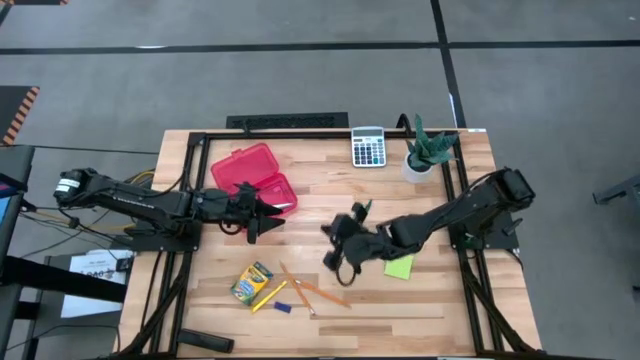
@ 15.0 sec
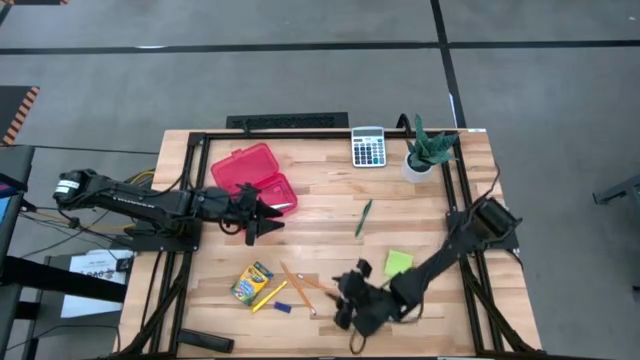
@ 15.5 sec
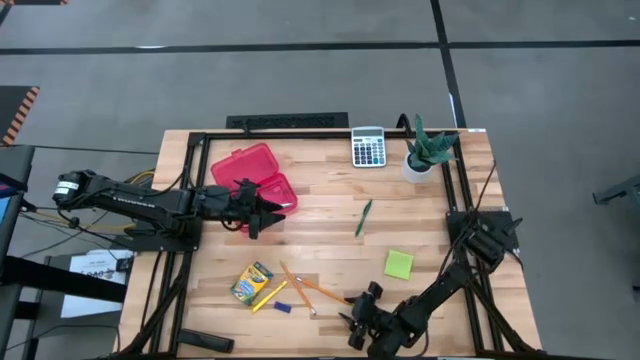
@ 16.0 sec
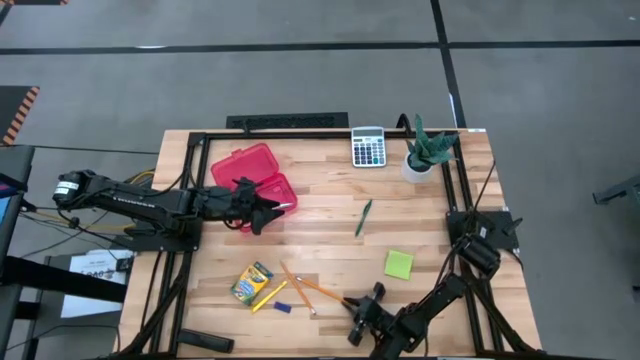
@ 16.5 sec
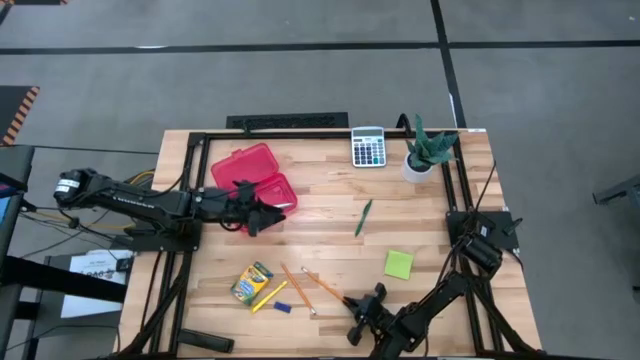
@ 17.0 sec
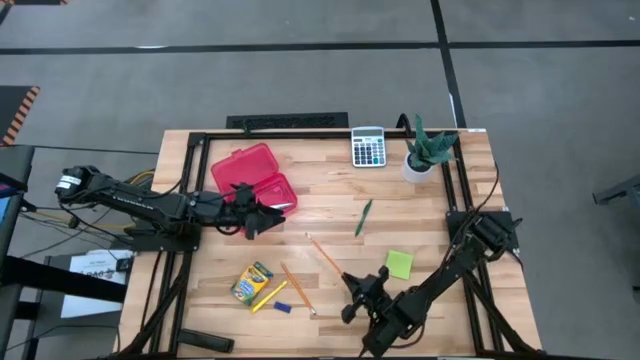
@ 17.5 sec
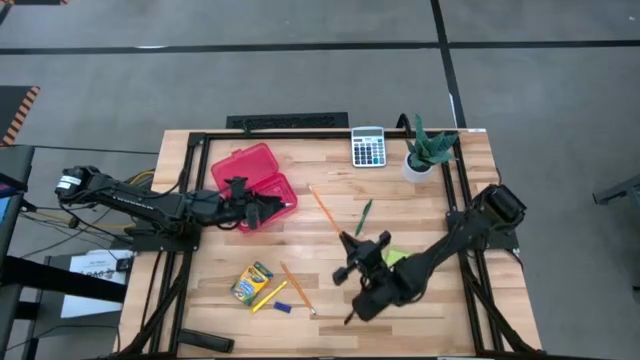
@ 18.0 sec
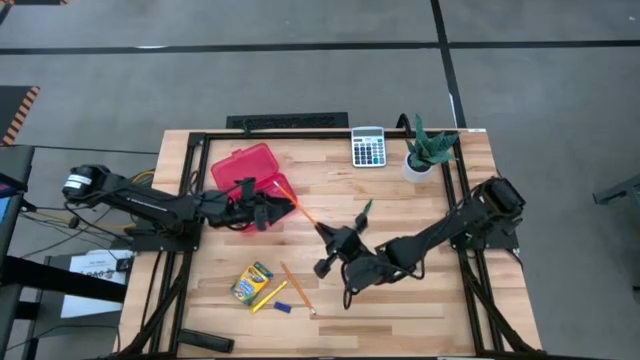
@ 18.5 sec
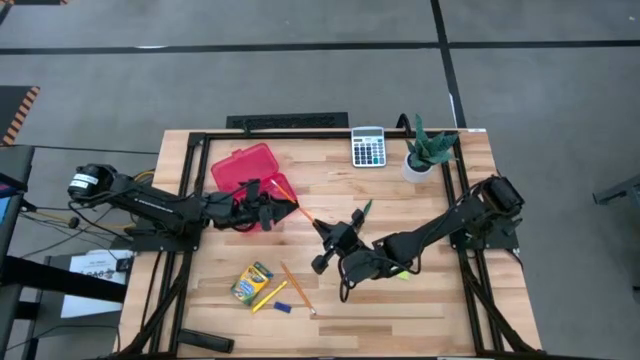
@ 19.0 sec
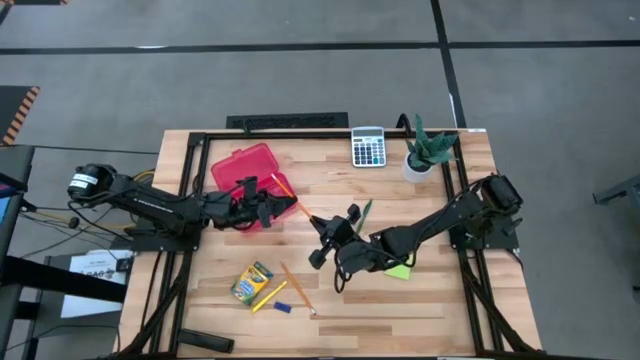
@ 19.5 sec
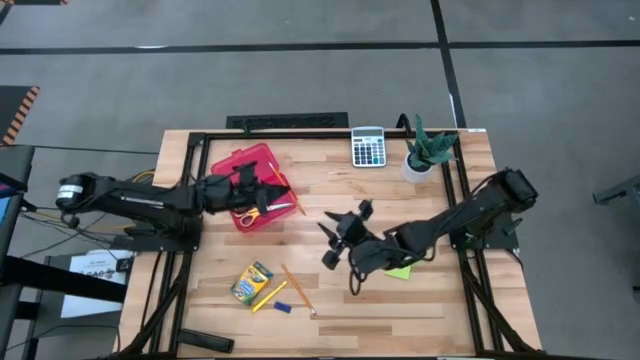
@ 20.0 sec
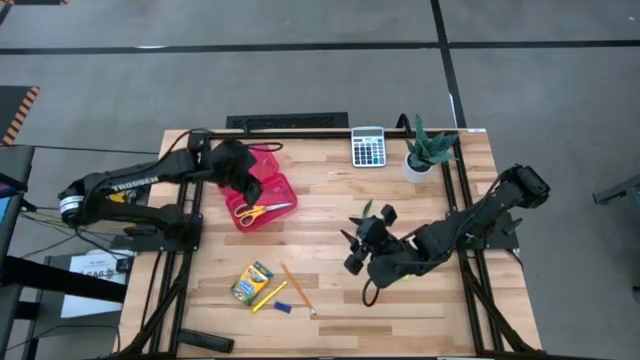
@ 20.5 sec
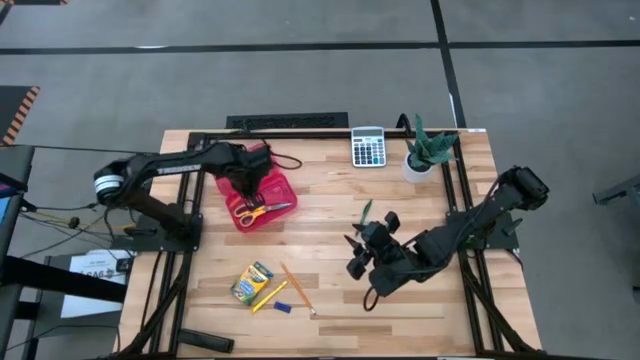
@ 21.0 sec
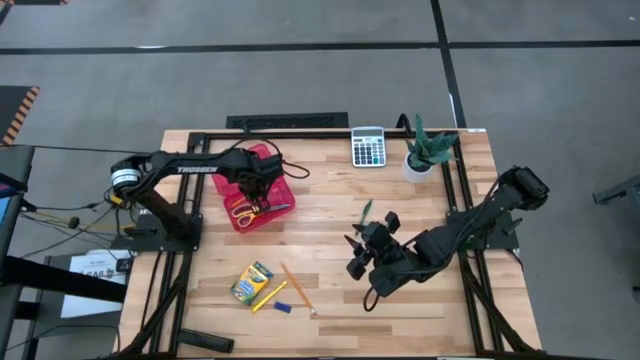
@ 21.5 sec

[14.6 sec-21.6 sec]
Task: Pack school essentials
Put the right orange pencil into the red supply box

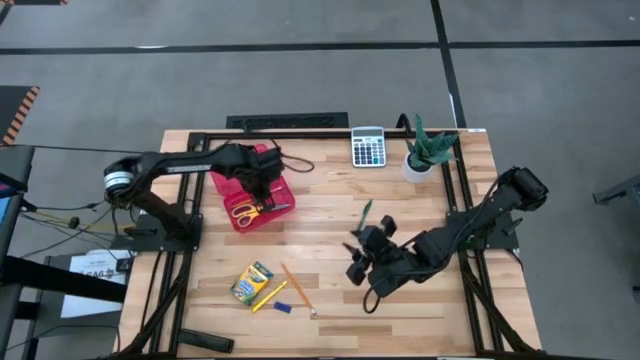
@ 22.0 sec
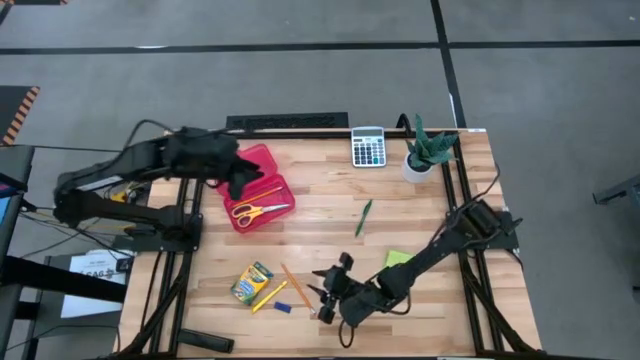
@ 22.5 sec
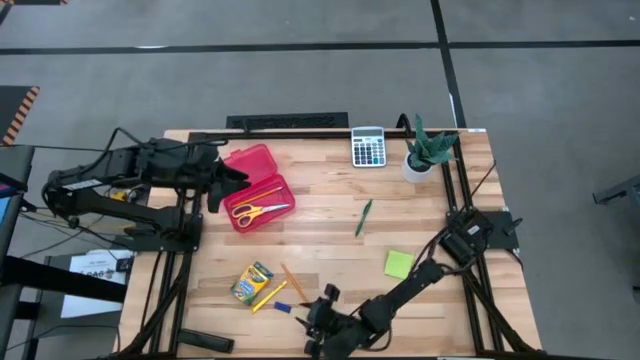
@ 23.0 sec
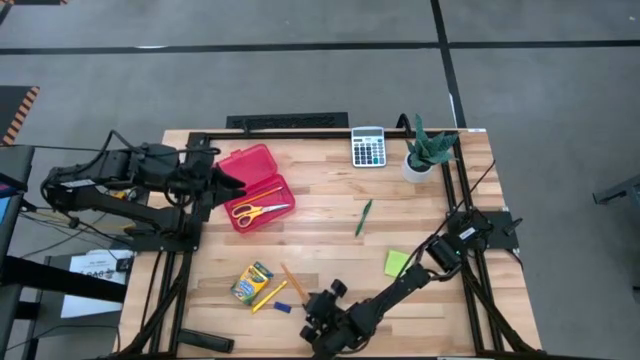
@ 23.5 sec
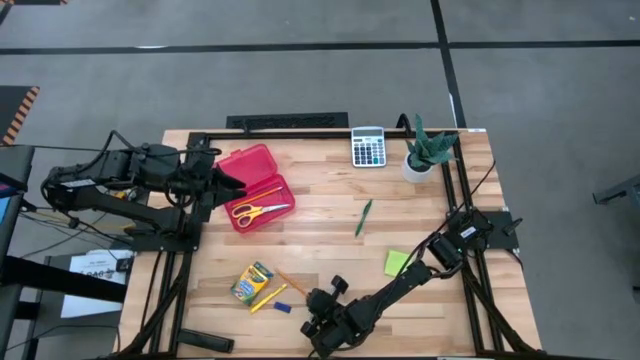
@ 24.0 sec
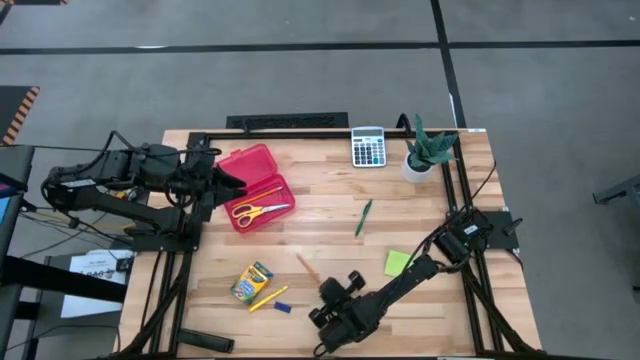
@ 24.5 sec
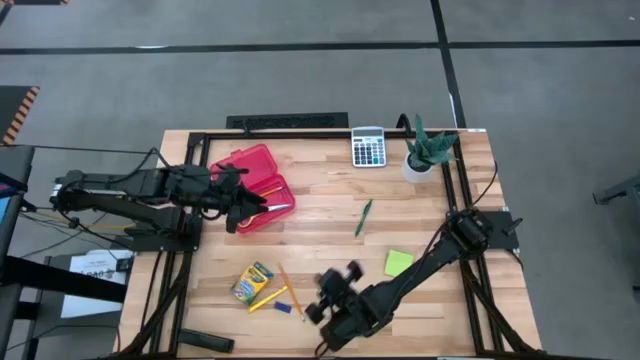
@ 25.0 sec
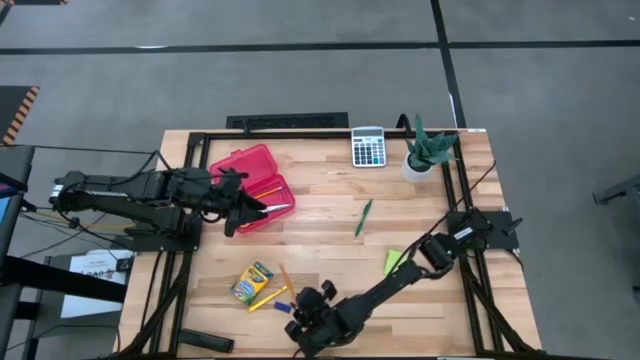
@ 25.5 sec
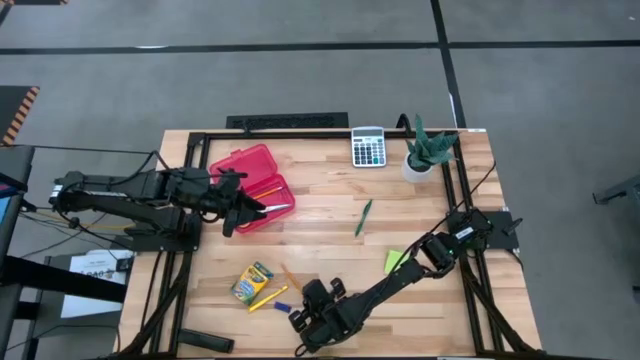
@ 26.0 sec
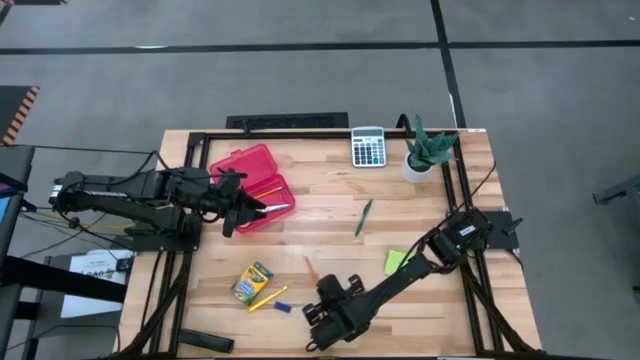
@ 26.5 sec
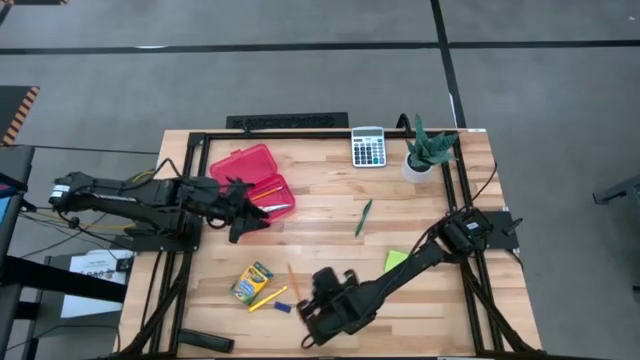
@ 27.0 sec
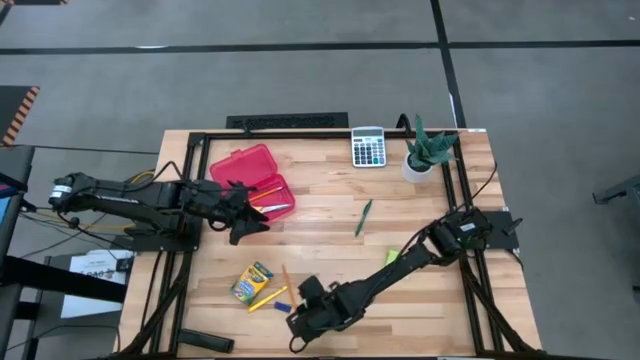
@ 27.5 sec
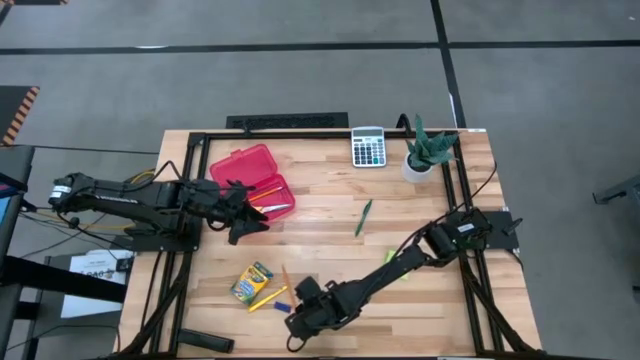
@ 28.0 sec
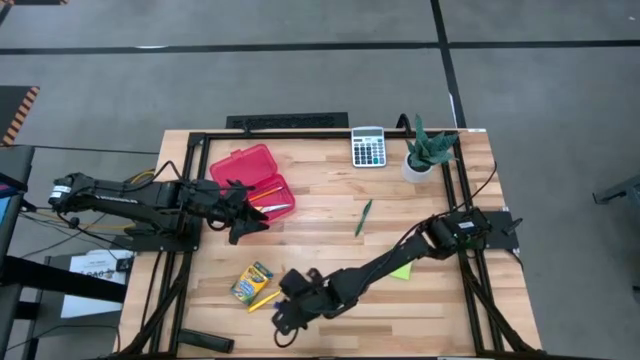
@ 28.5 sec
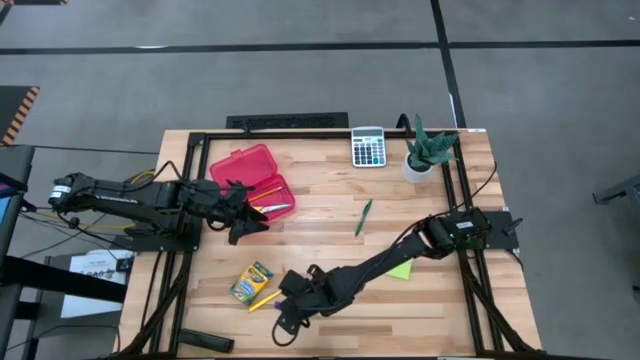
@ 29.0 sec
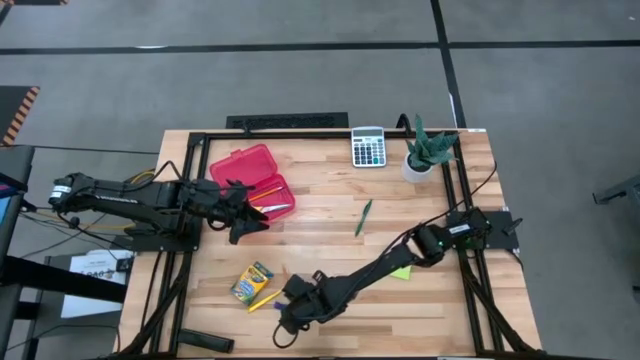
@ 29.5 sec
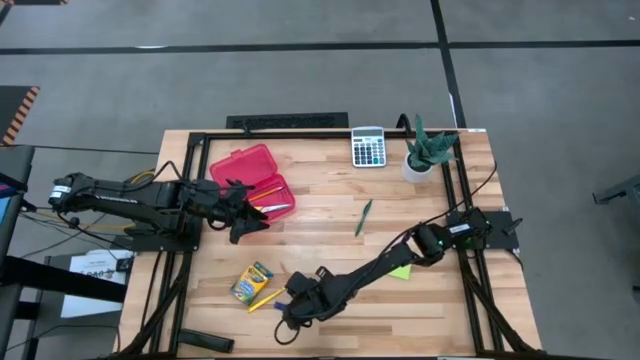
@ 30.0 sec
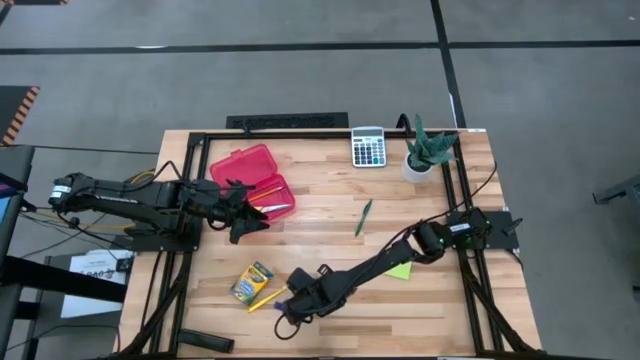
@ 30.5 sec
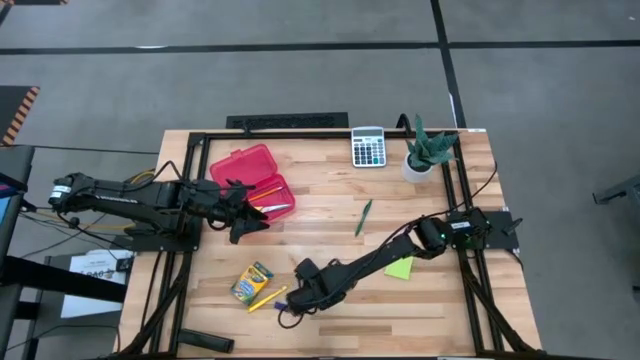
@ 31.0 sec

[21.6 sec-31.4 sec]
Put the orange pencil into the red supply box

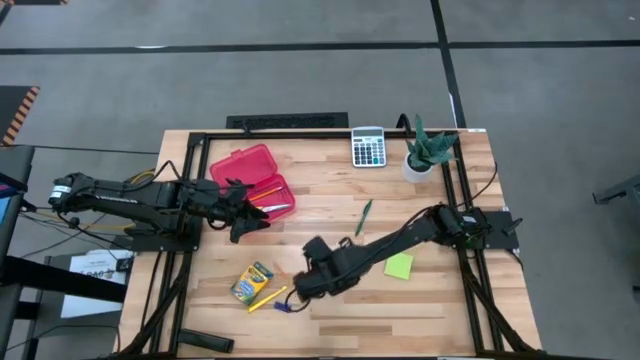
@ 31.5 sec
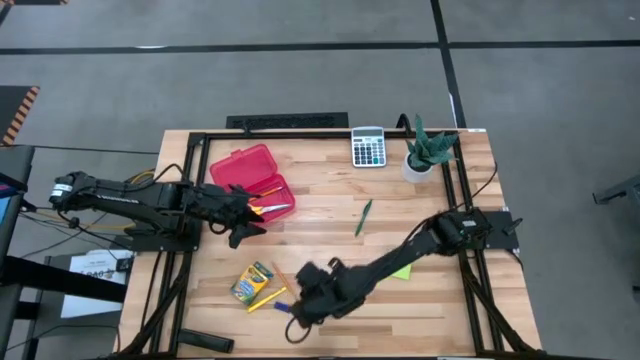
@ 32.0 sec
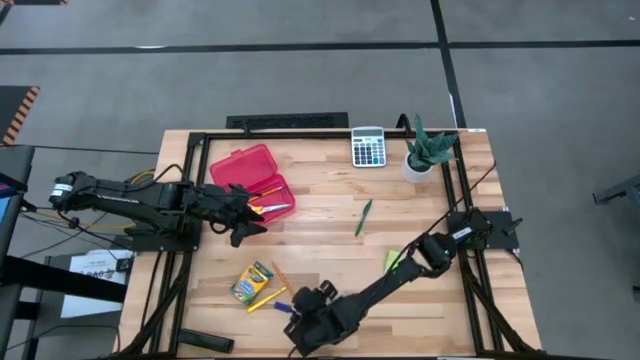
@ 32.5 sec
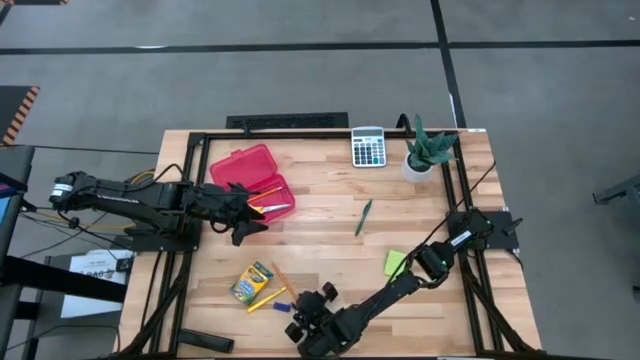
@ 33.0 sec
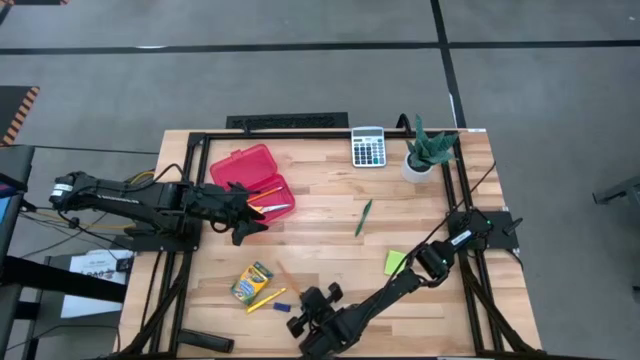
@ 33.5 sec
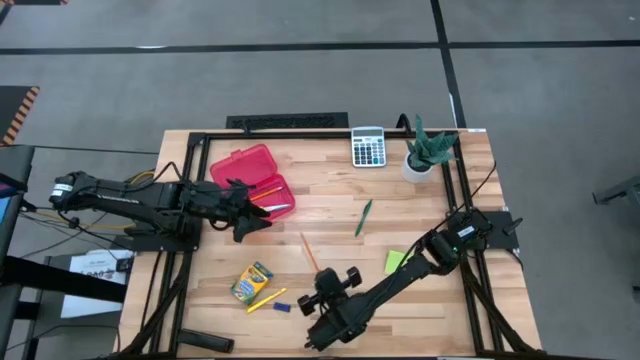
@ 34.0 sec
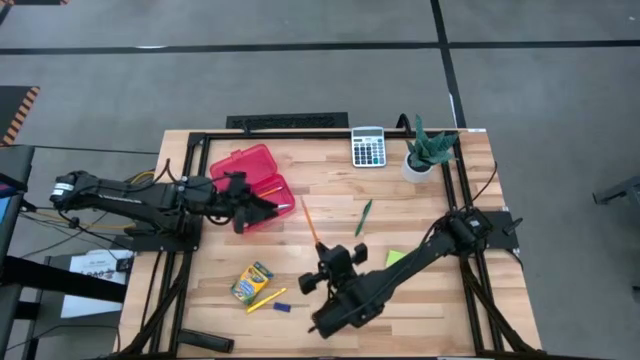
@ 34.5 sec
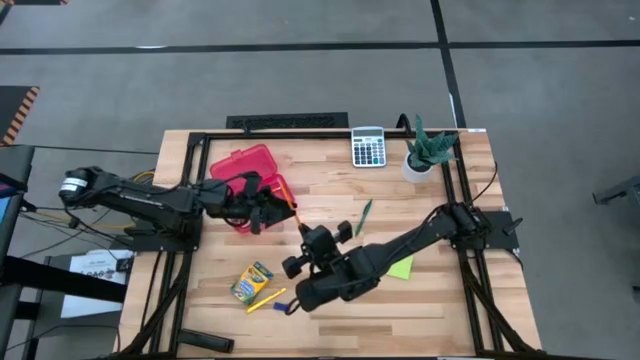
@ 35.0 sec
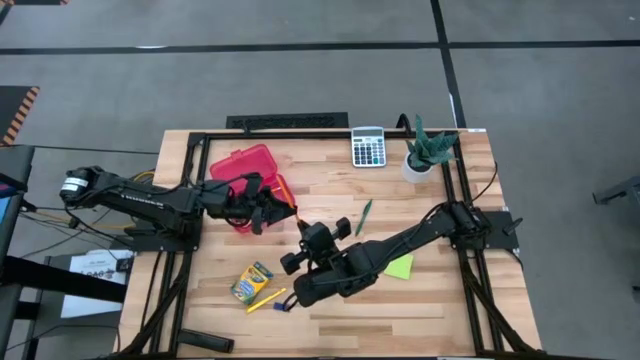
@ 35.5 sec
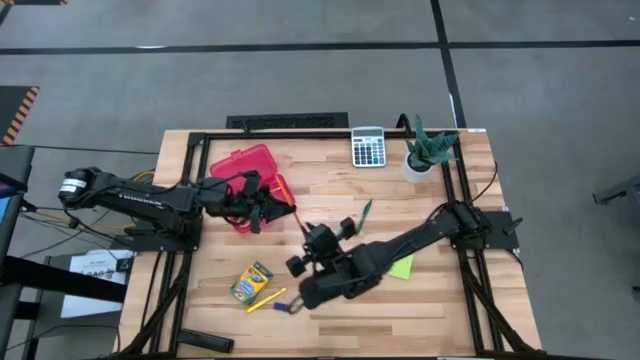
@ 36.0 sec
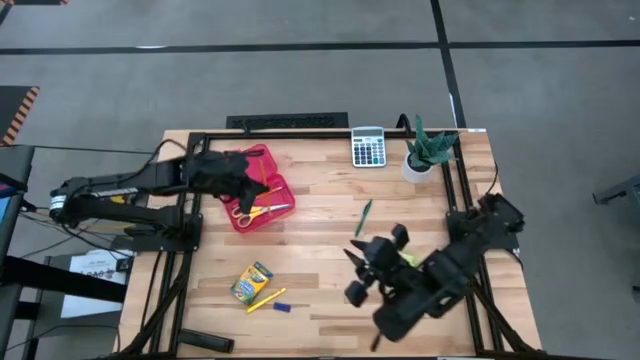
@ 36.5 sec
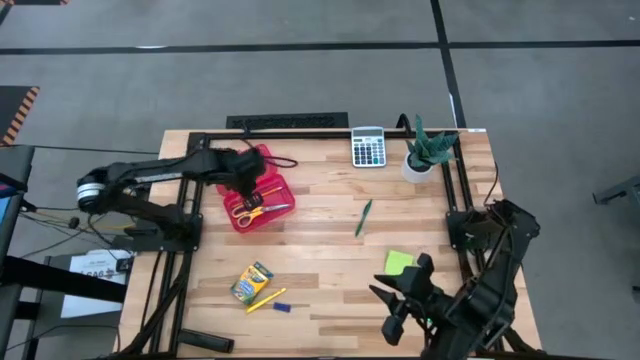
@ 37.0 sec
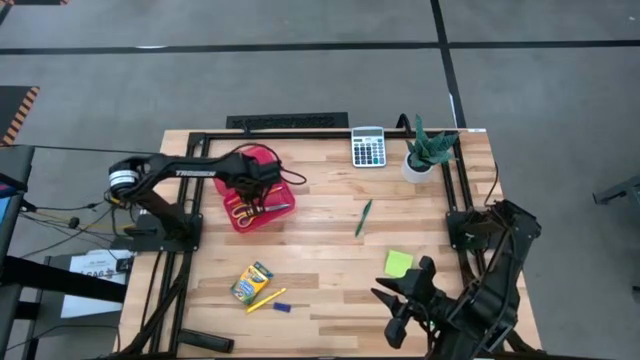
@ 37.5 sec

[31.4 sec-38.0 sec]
Put the orange pencil into the red supply box
